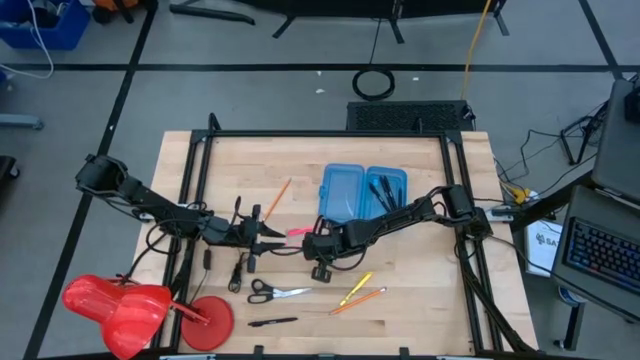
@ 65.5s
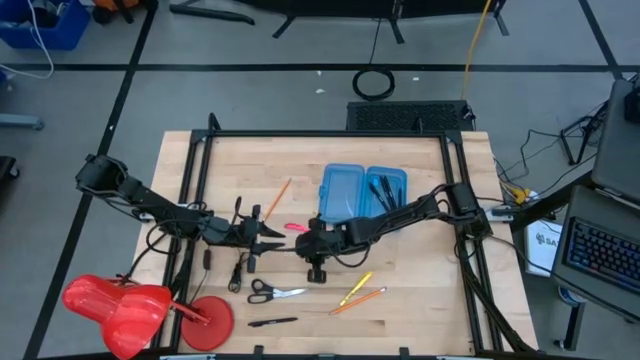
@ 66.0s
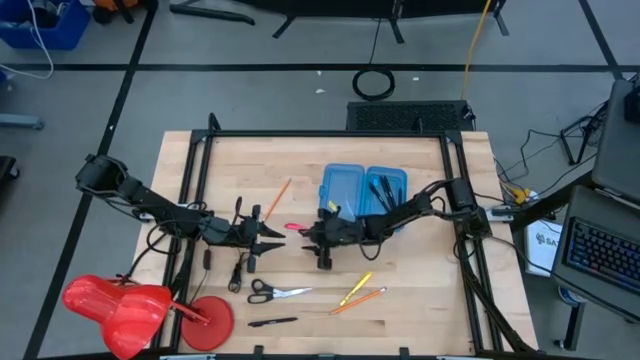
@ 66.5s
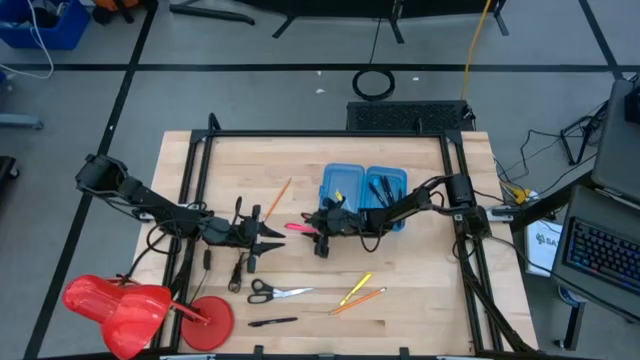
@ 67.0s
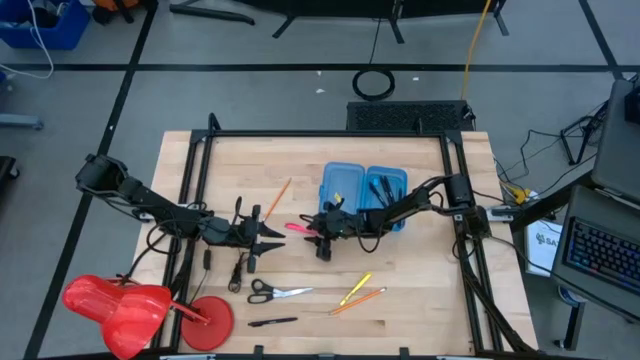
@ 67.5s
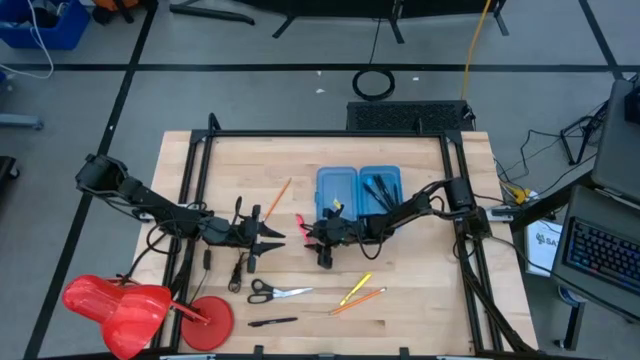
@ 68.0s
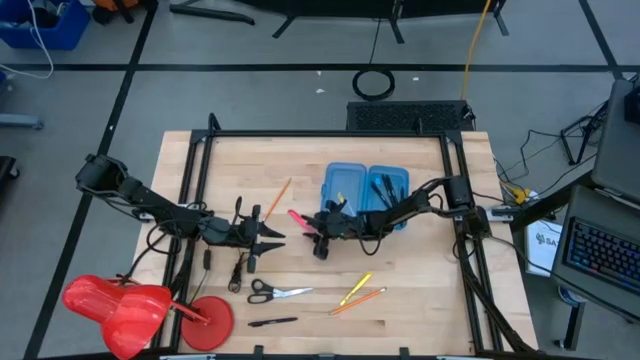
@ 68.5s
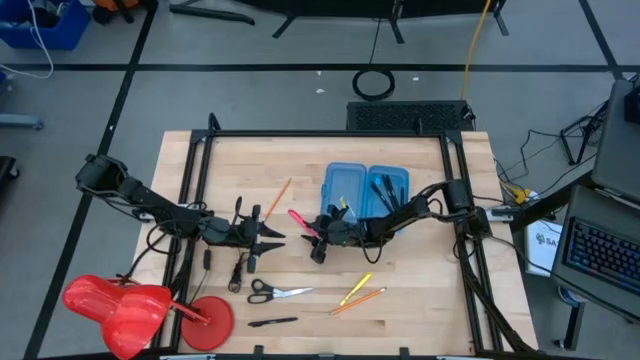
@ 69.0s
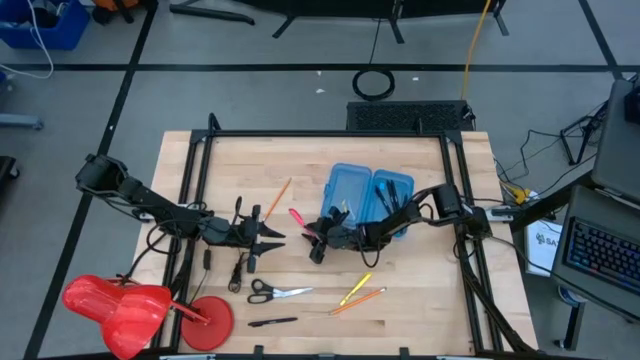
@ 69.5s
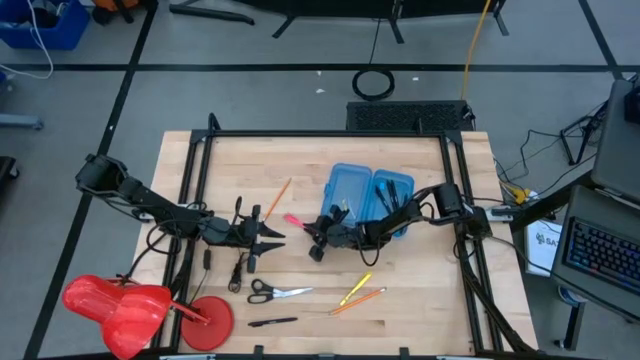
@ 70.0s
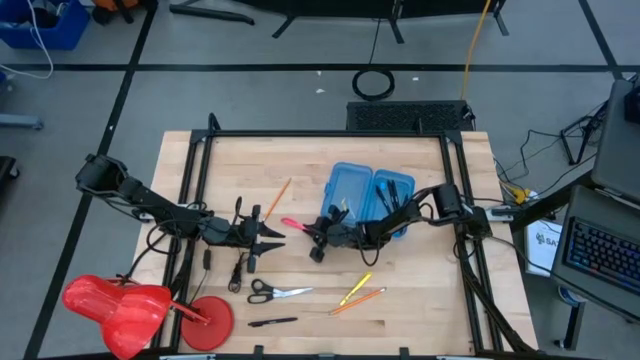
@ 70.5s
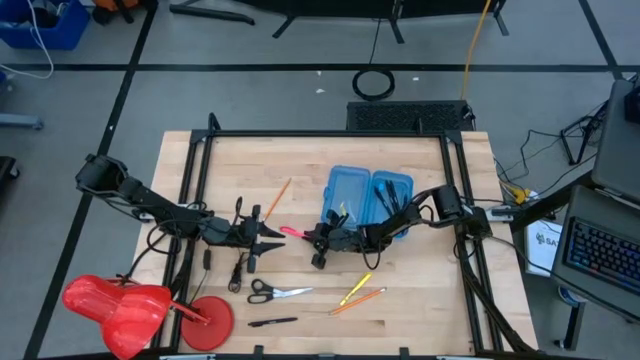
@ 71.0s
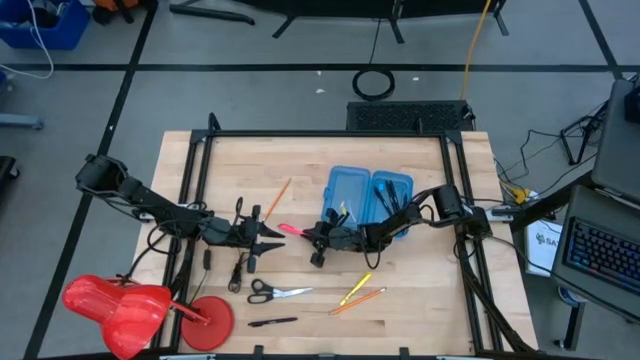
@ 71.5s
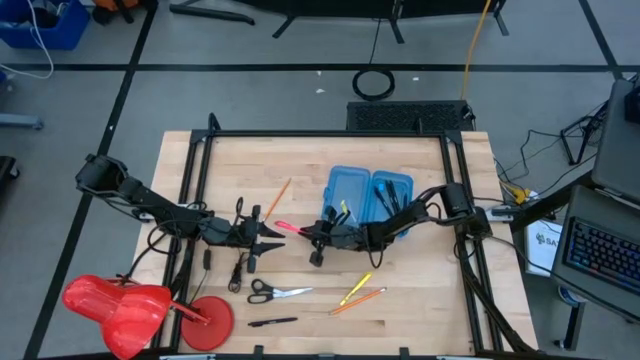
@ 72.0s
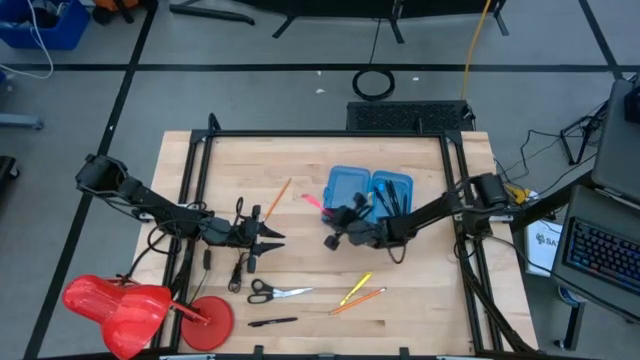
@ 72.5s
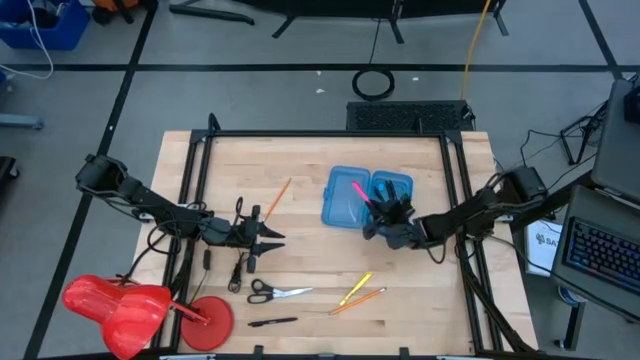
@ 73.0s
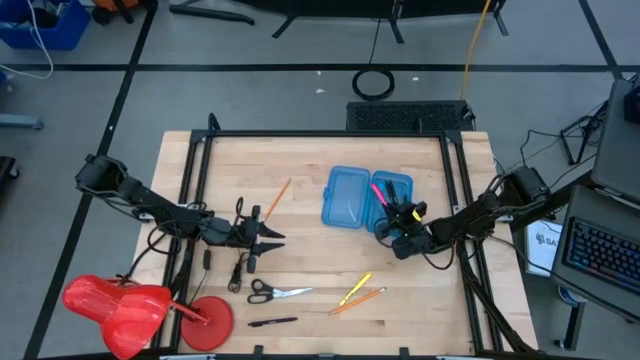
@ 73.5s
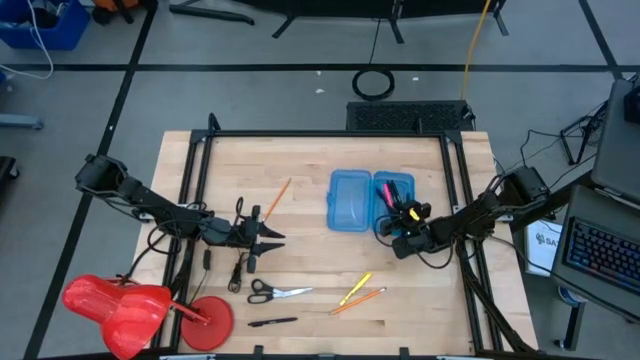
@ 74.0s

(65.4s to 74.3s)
Task: Pick & place school supplies into a supply box
Put the pink pen into the blue supply box

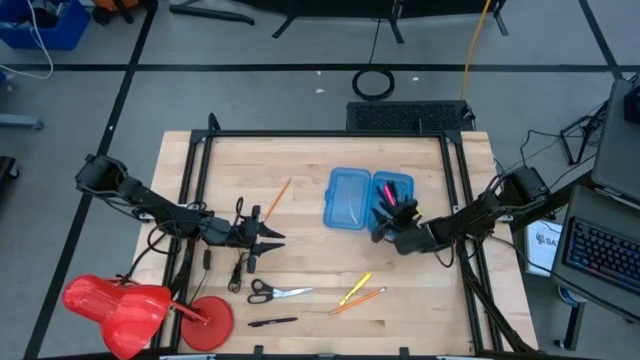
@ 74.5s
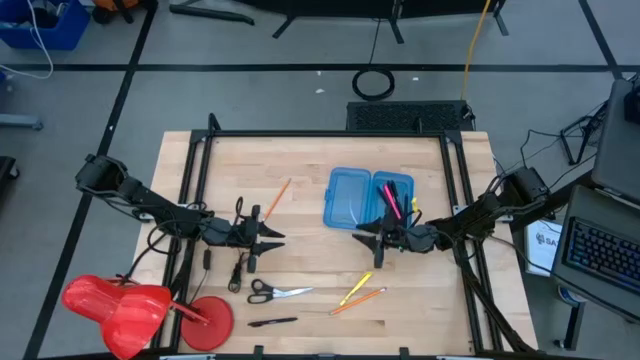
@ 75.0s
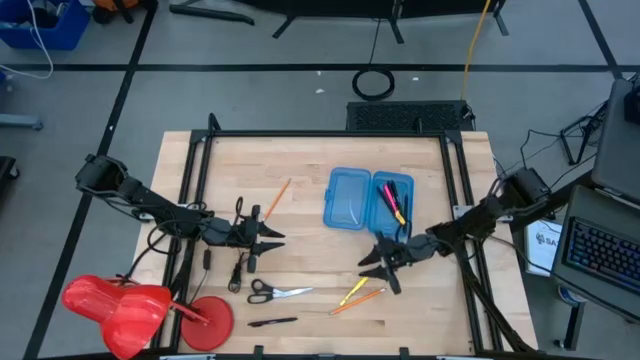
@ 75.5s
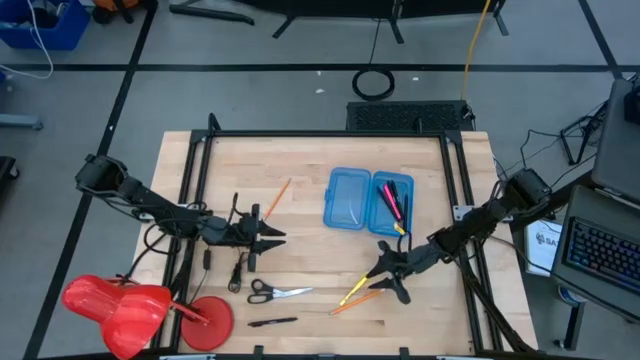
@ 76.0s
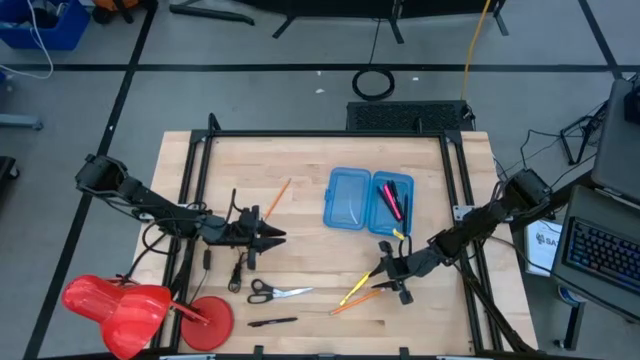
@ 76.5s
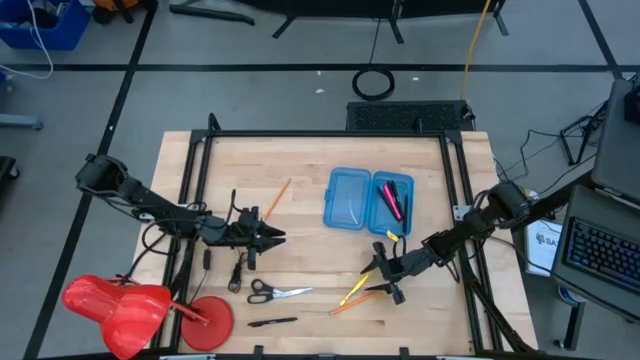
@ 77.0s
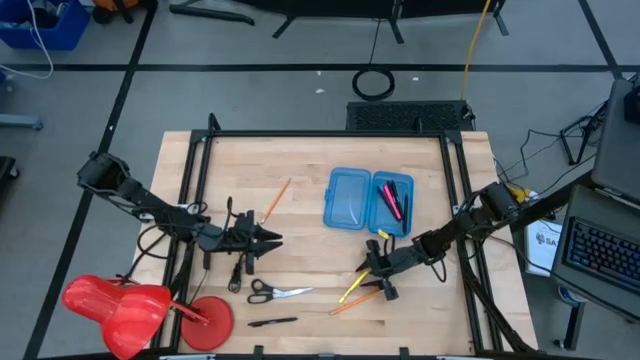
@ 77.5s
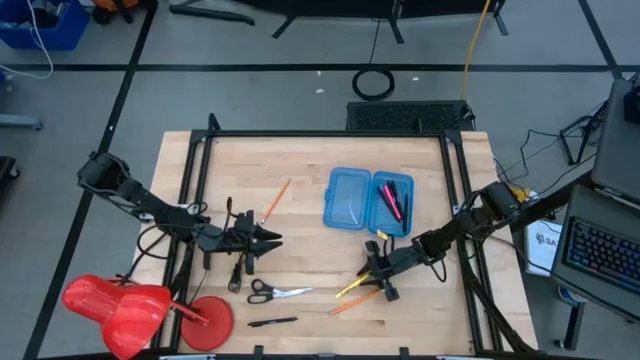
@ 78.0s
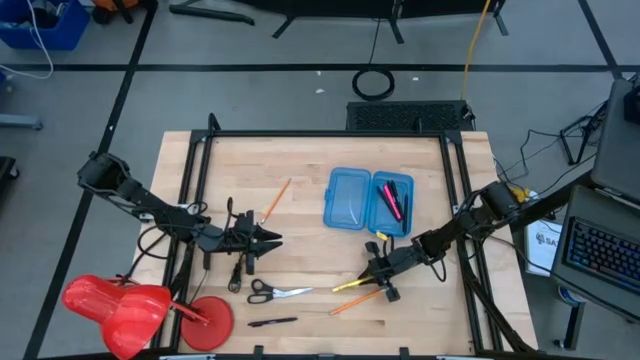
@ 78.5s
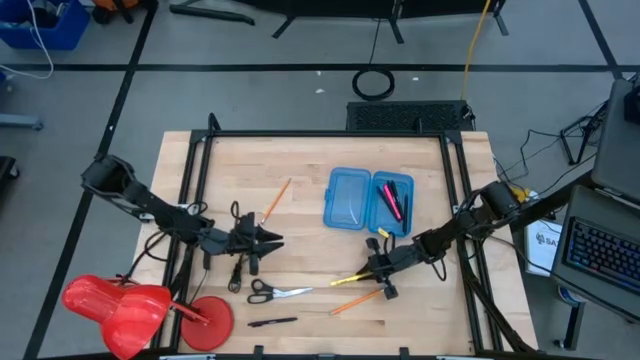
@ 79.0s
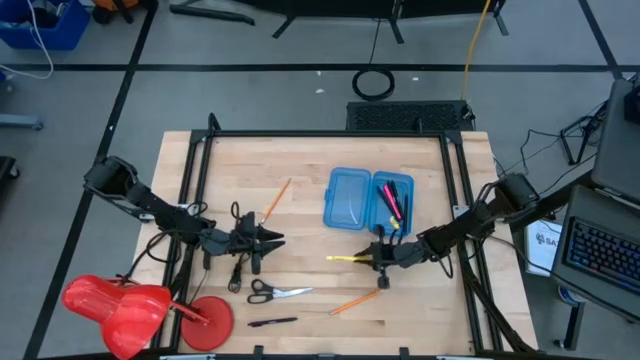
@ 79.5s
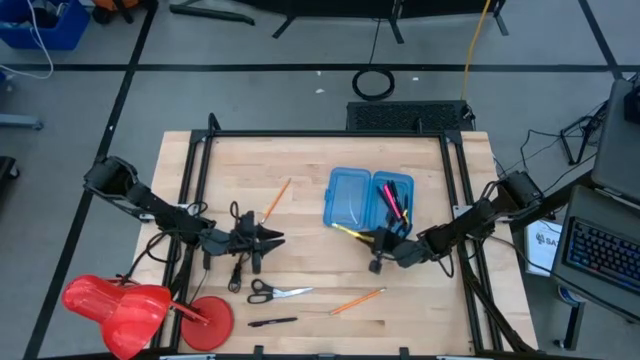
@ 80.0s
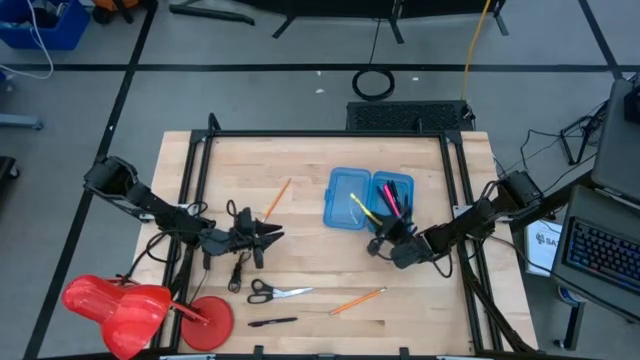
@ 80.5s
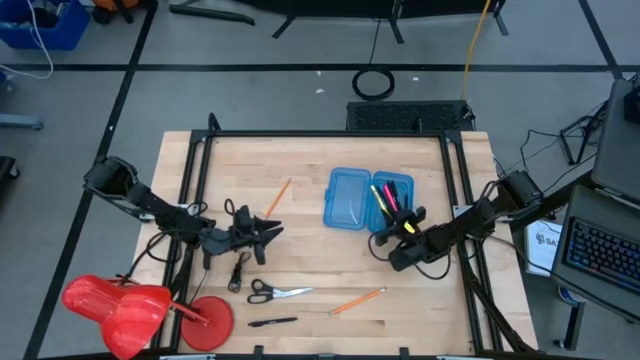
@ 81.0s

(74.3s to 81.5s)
Put the yellow pen into the blue supply box

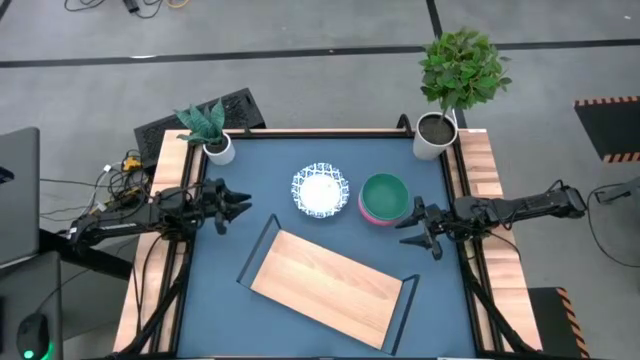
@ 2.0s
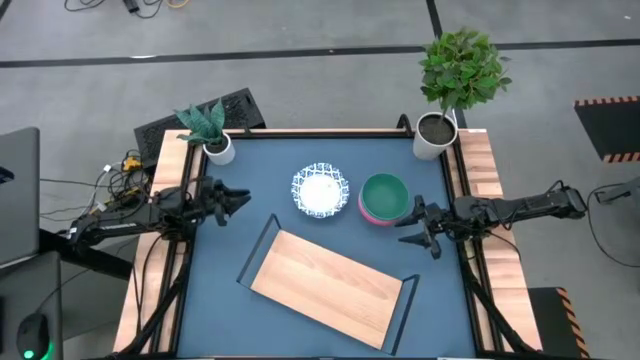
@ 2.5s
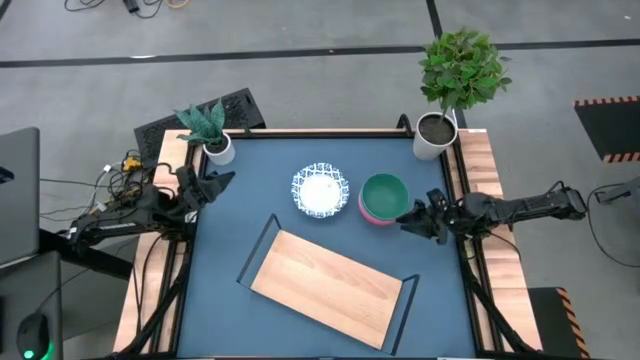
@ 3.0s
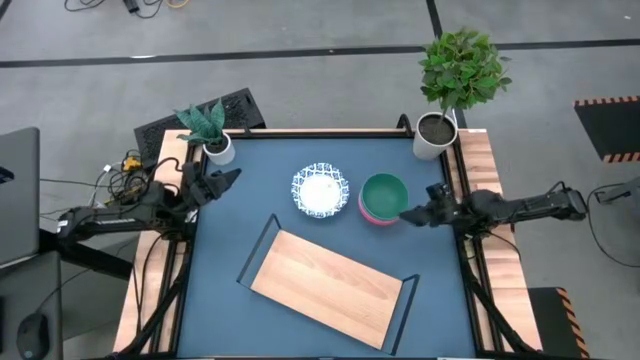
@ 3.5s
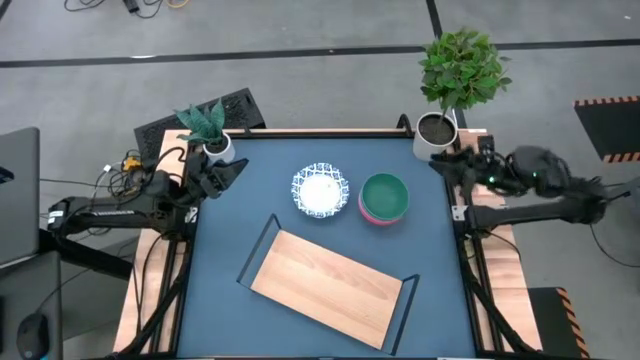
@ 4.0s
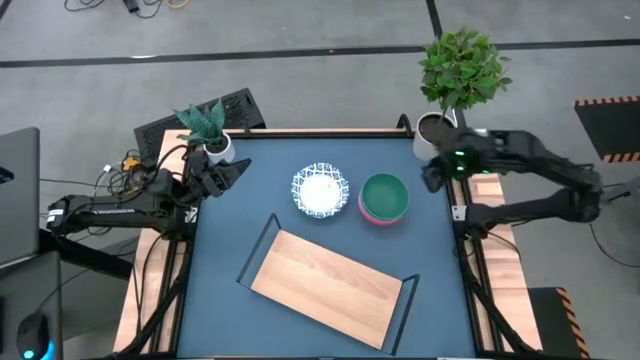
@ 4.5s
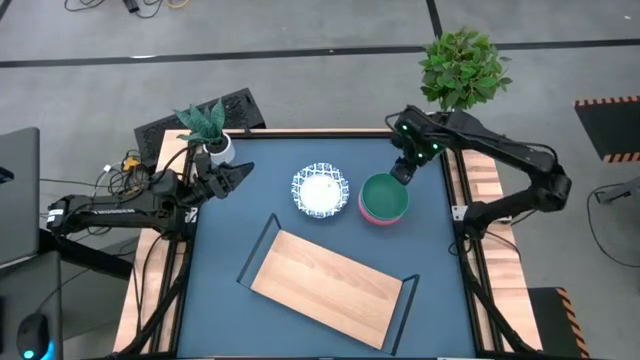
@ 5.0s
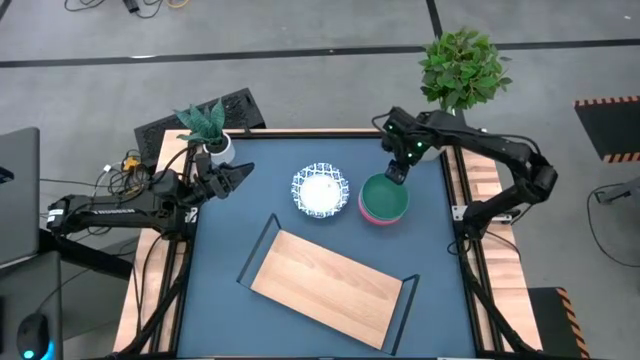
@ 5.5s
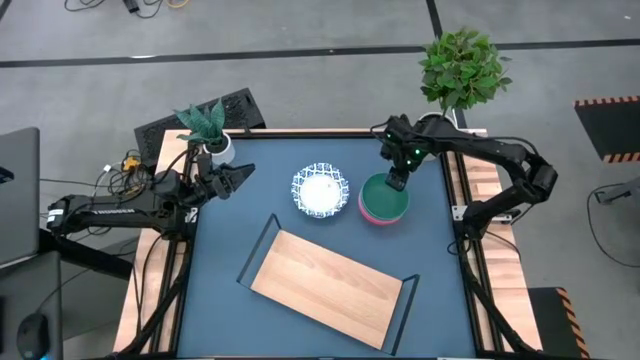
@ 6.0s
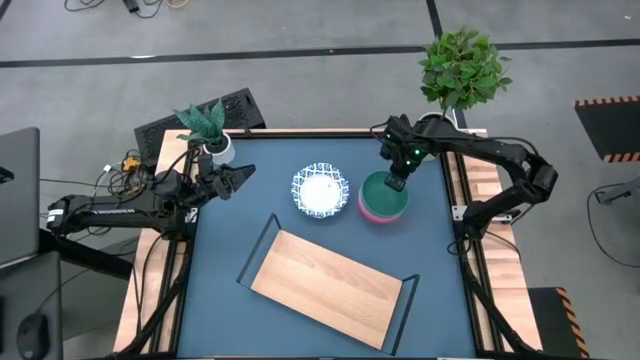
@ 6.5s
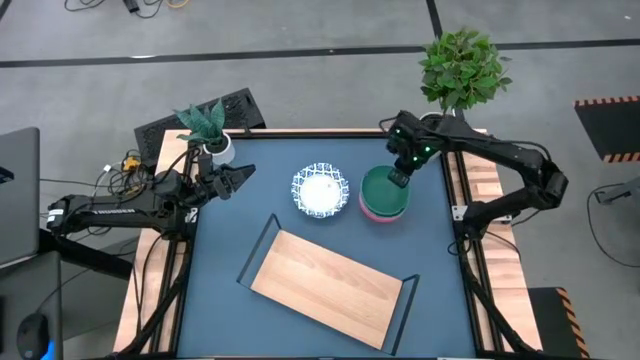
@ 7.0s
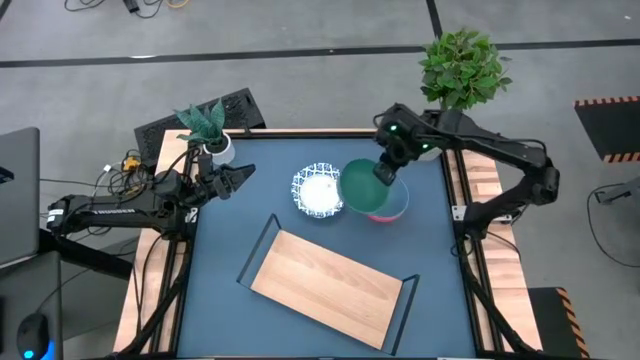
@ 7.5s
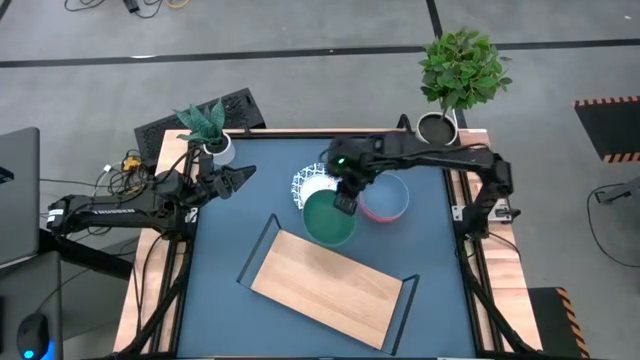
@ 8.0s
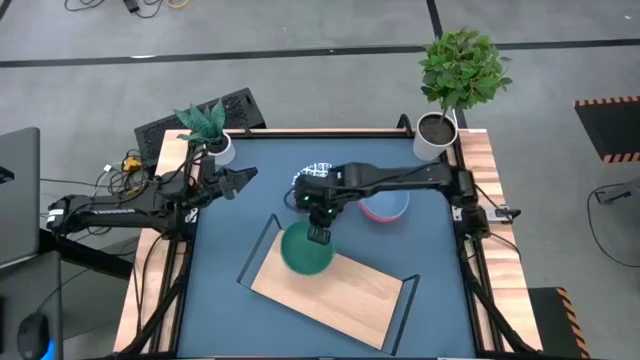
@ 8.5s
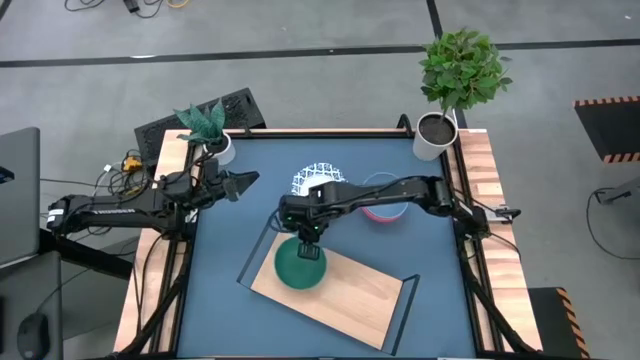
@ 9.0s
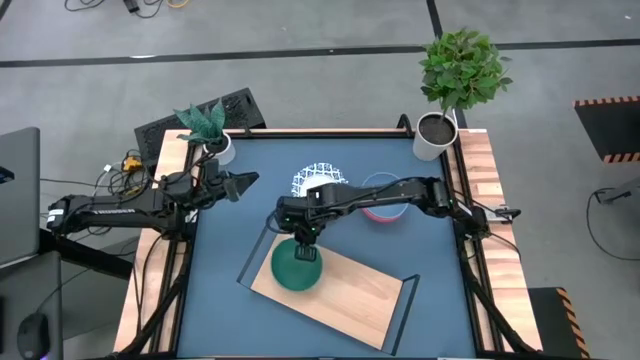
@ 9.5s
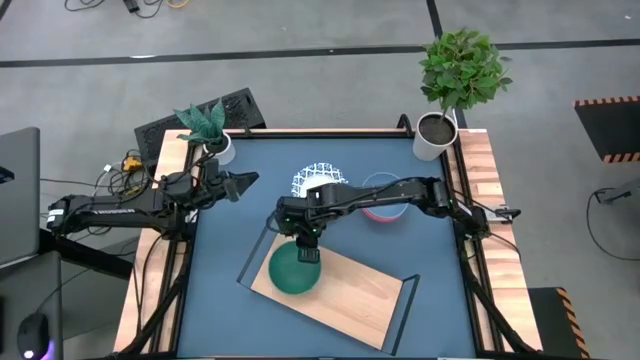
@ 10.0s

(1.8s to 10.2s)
Task: Place and stack bowls onto a shelf
Put the green bowl on the shelf
